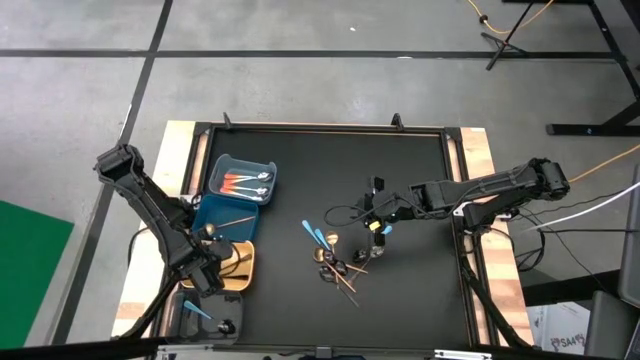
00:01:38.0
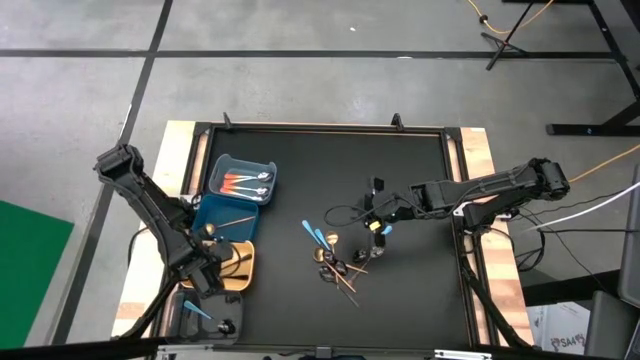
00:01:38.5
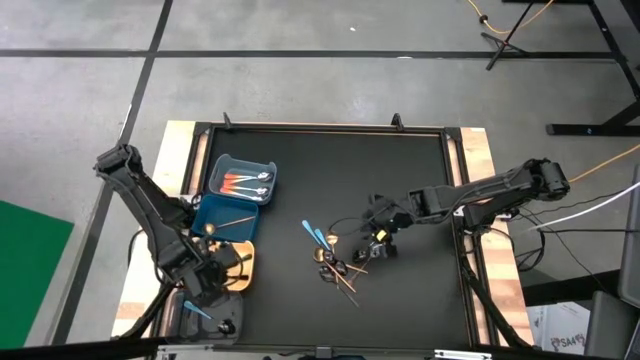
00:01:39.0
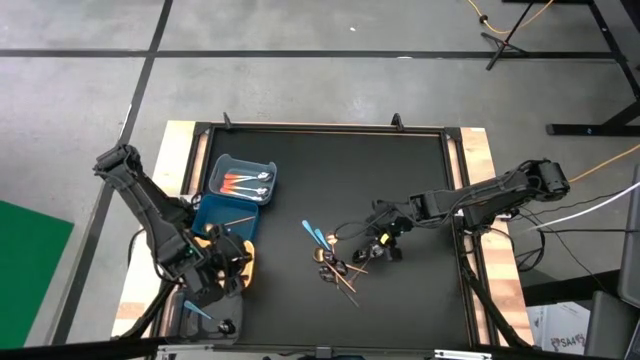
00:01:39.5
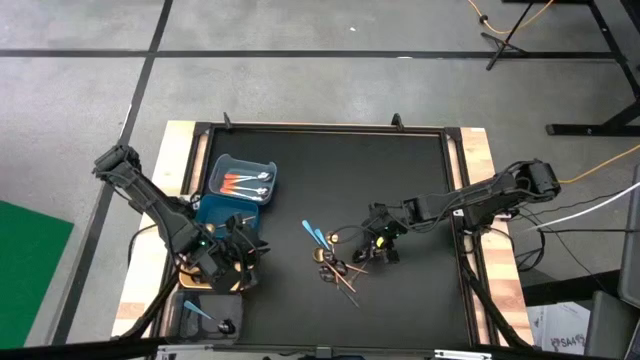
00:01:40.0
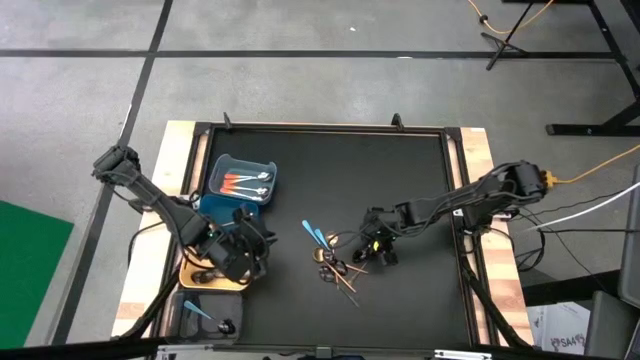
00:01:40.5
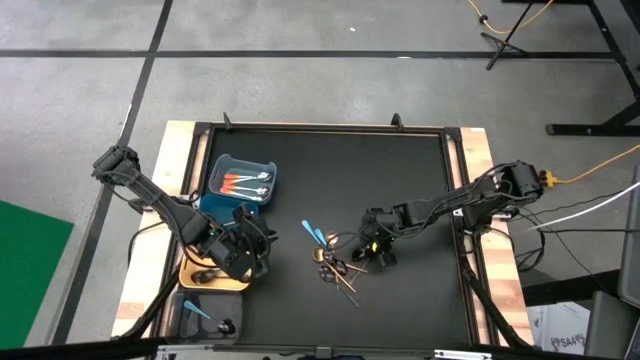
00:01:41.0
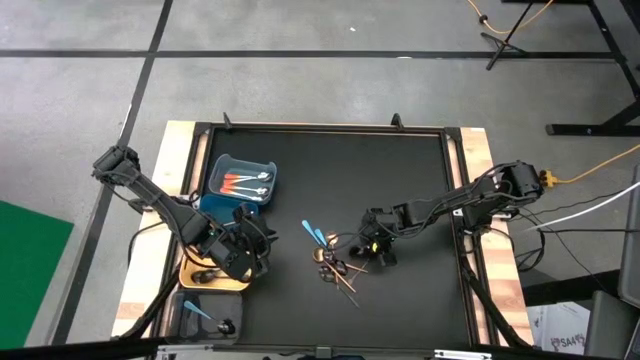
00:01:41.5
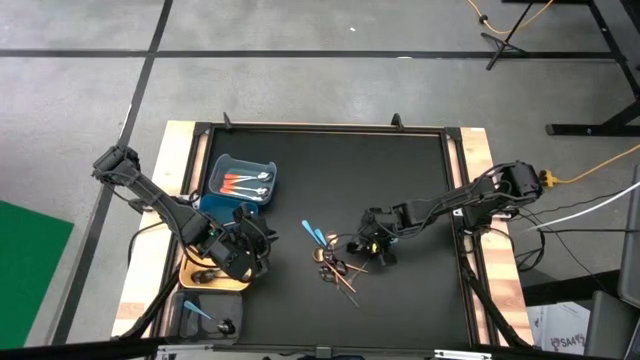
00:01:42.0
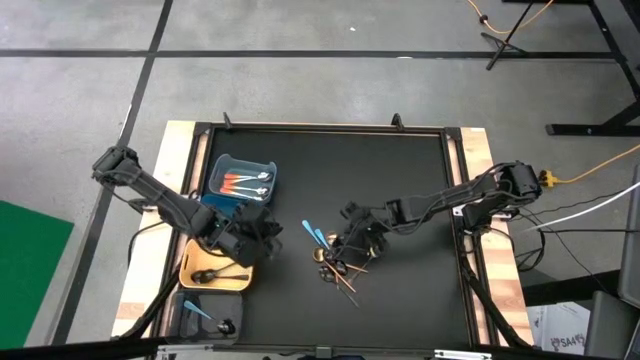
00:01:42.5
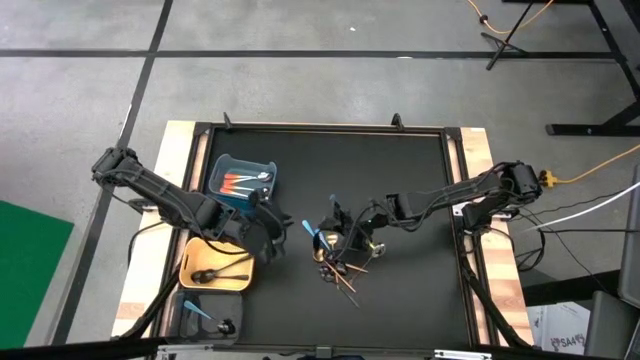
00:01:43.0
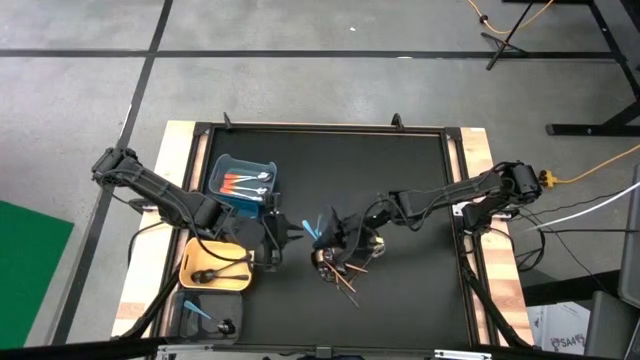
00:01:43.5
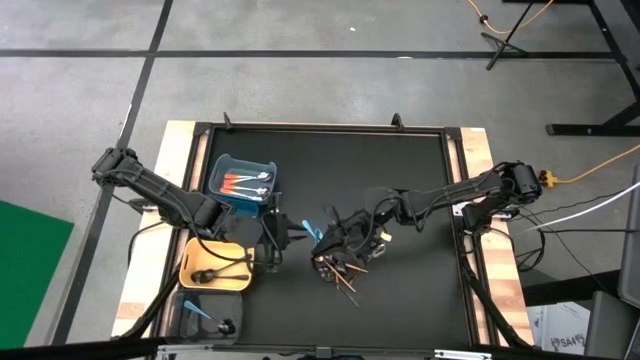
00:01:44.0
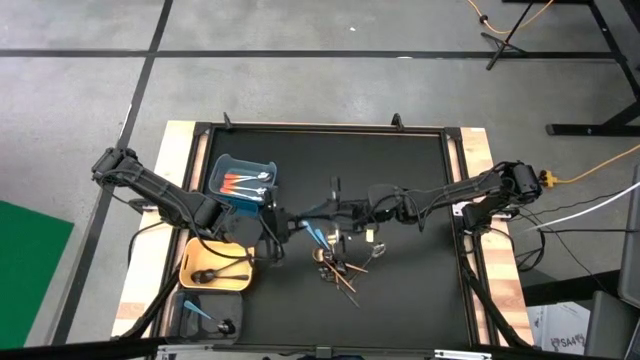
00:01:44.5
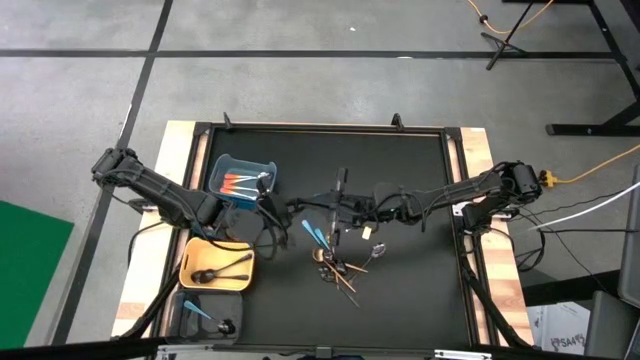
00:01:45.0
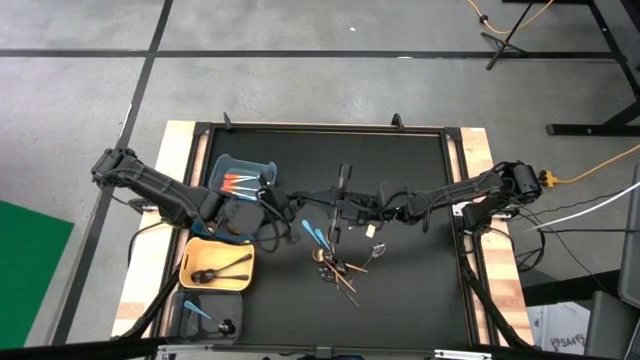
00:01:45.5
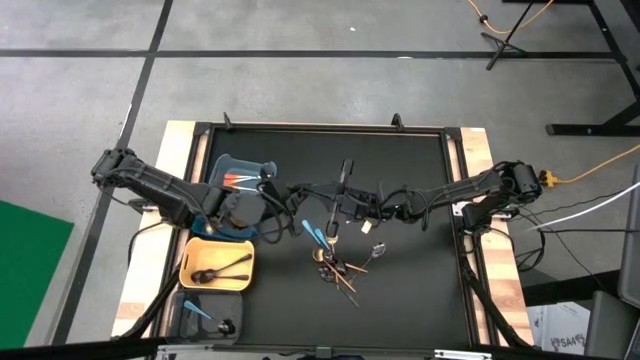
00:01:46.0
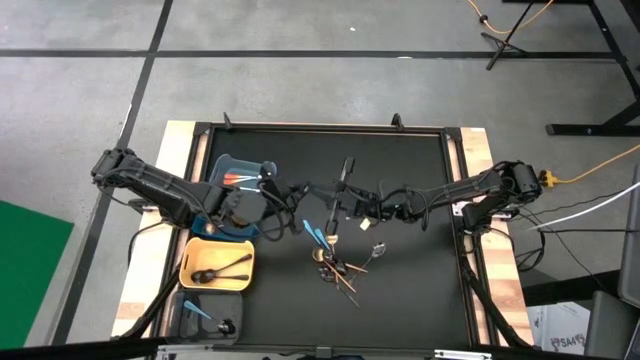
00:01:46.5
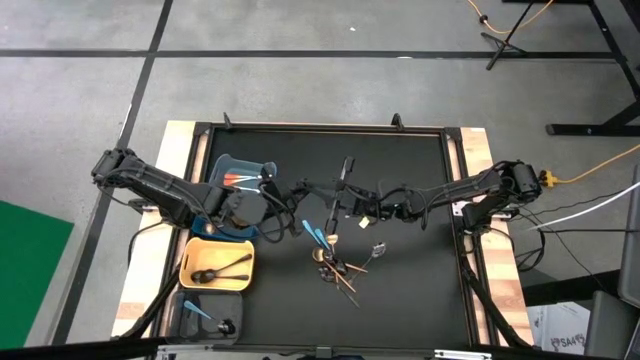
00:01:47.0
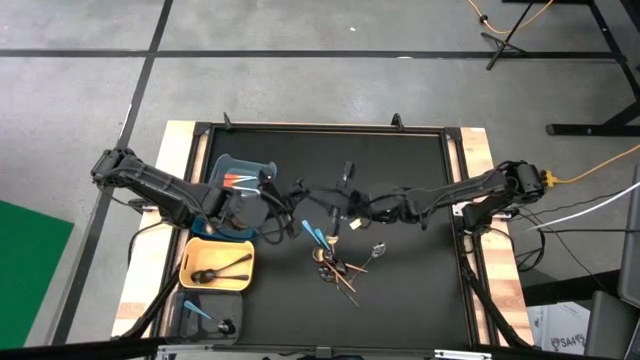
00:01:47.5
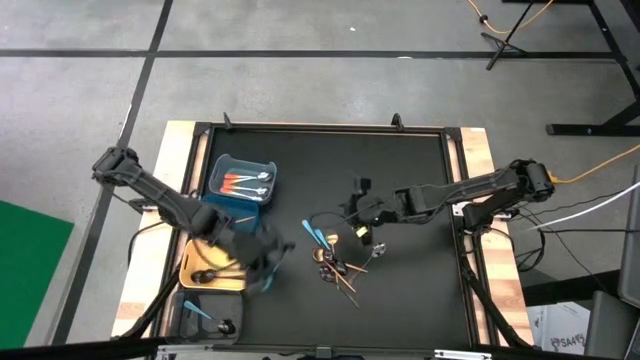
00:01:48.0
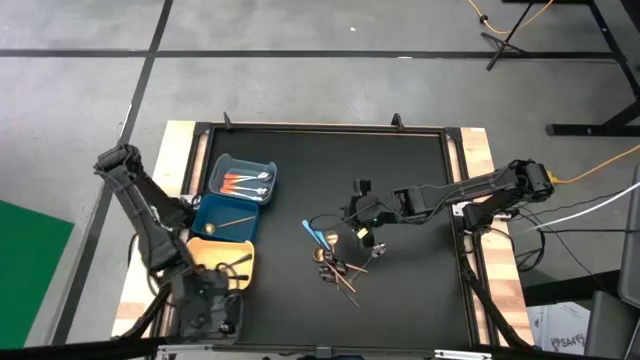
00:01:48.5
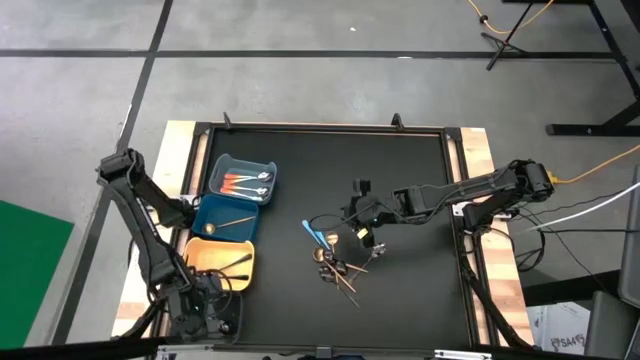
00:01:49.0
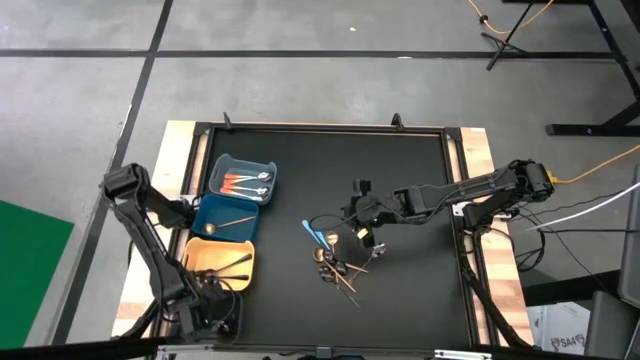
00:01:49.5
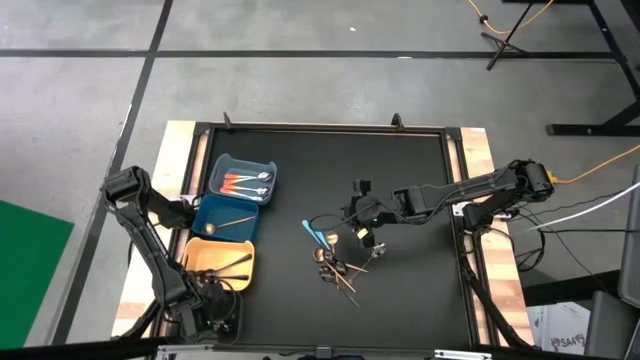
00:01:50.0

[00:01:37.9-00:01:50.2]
Task: Sort silverware by color (type)
Put the blue spoon into the black bin

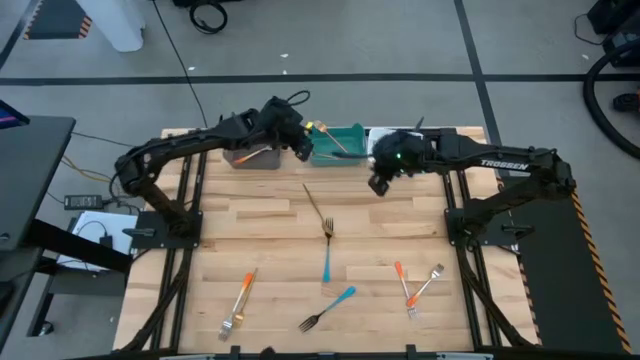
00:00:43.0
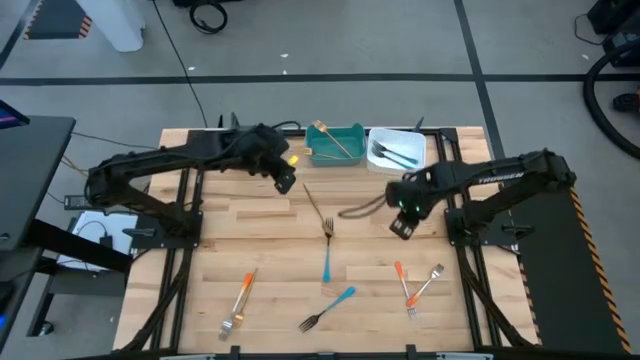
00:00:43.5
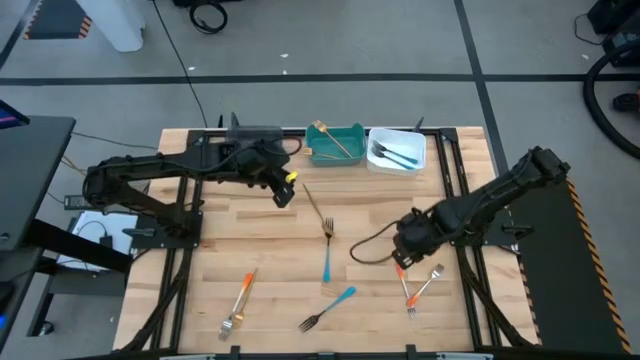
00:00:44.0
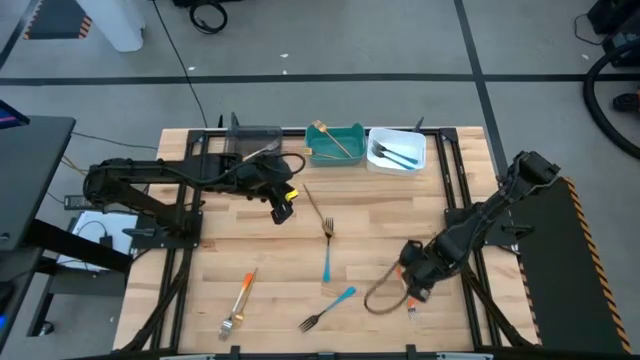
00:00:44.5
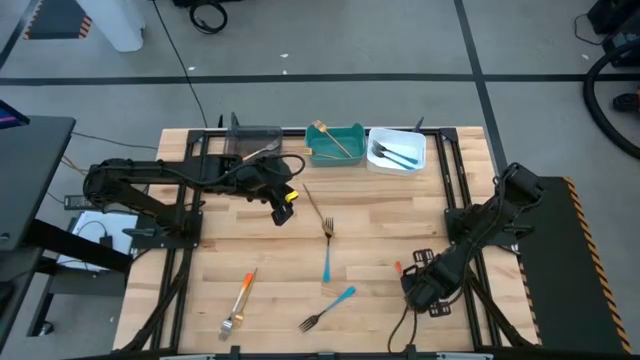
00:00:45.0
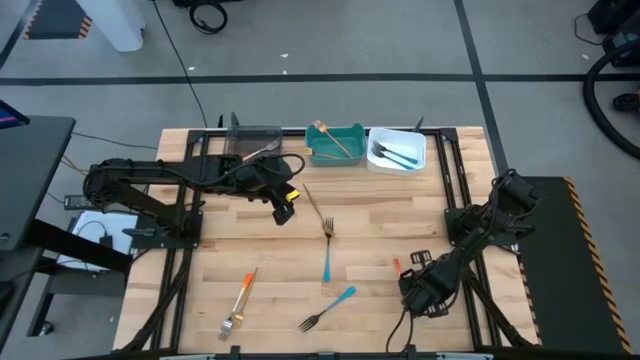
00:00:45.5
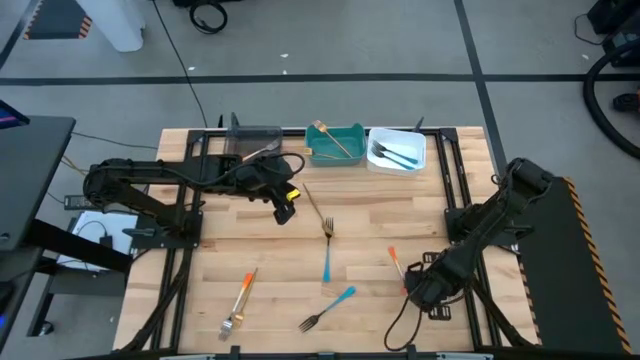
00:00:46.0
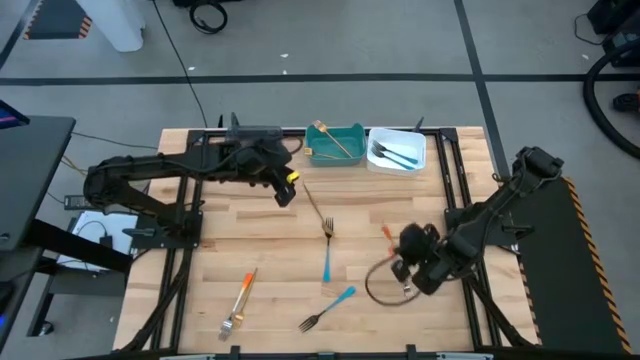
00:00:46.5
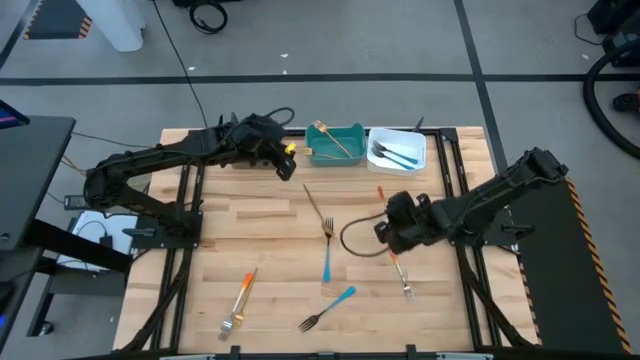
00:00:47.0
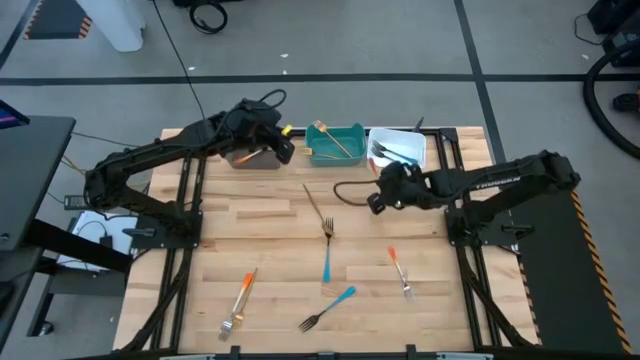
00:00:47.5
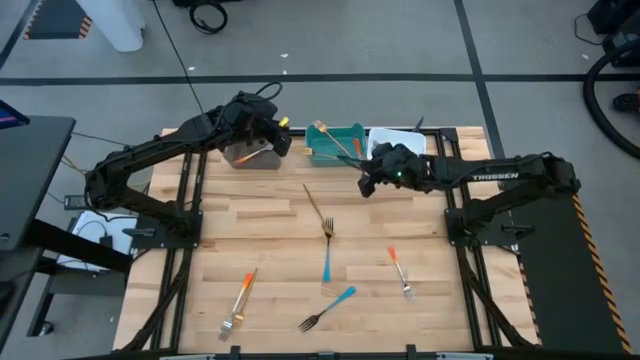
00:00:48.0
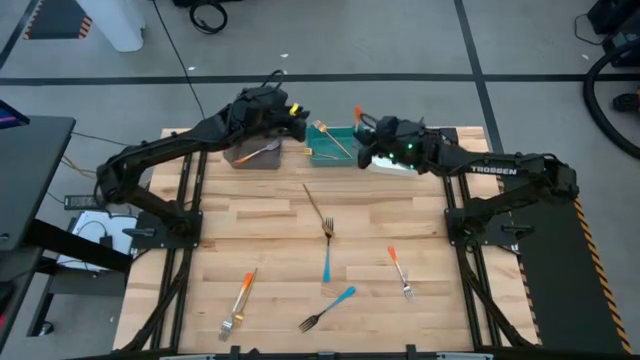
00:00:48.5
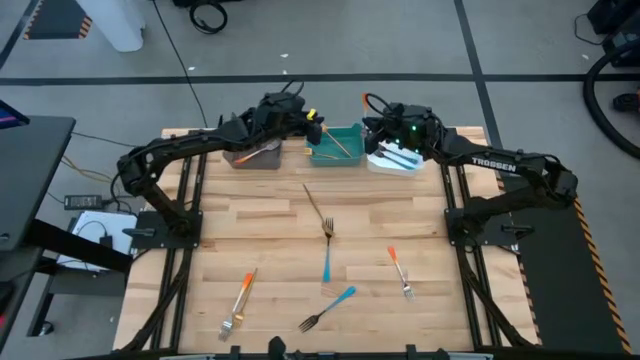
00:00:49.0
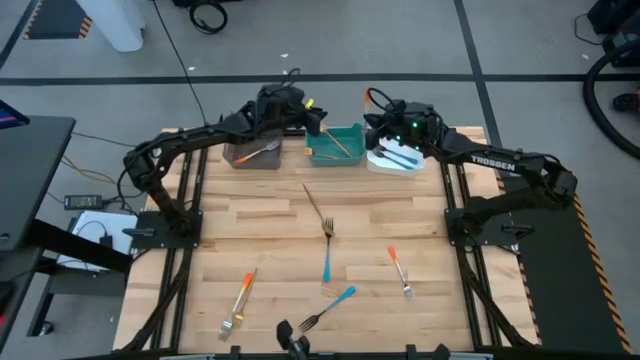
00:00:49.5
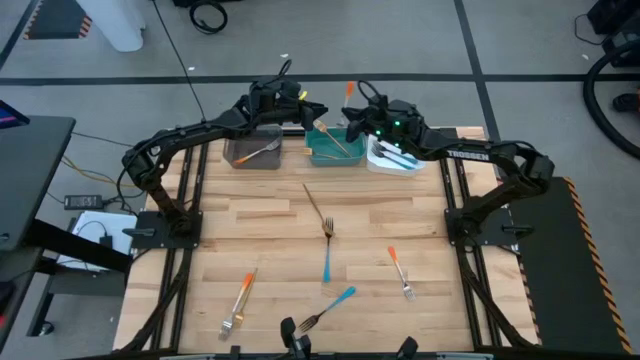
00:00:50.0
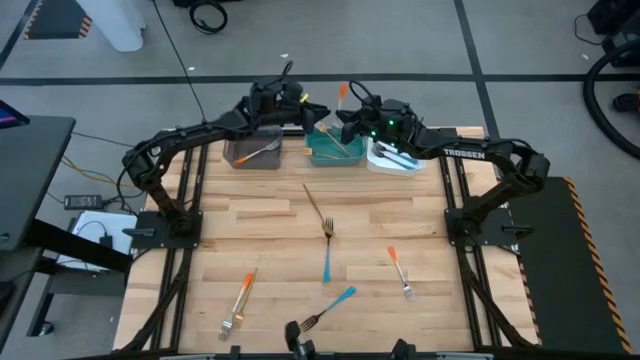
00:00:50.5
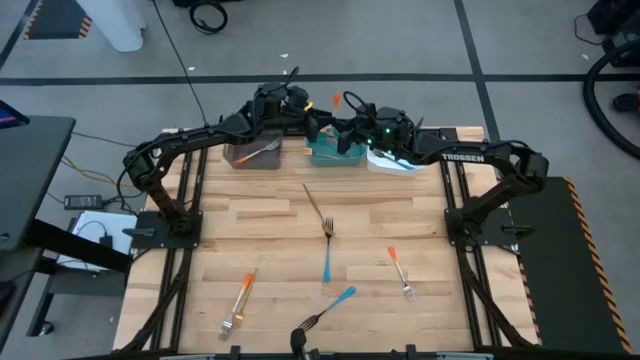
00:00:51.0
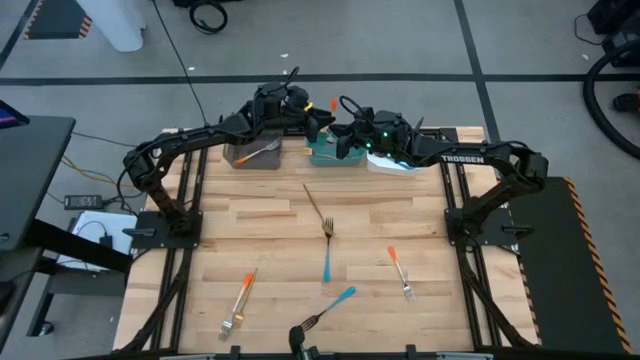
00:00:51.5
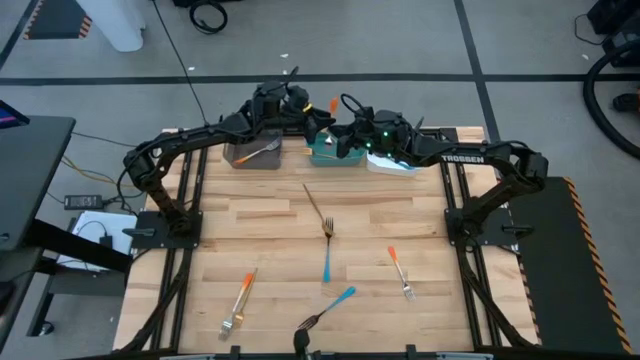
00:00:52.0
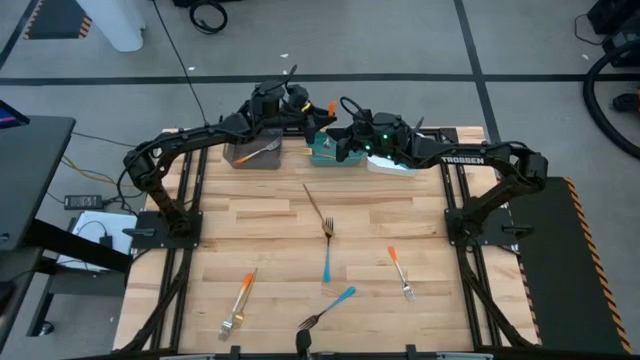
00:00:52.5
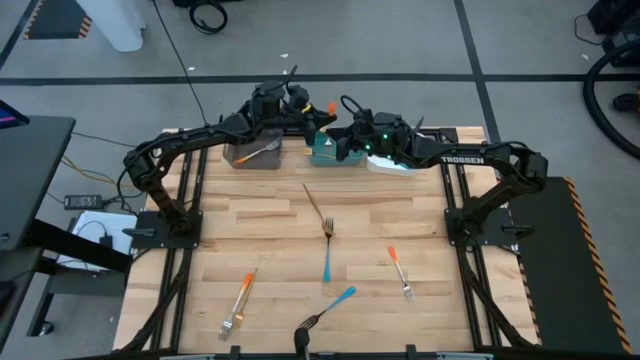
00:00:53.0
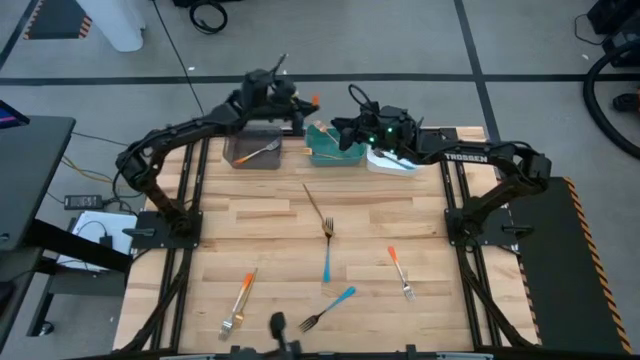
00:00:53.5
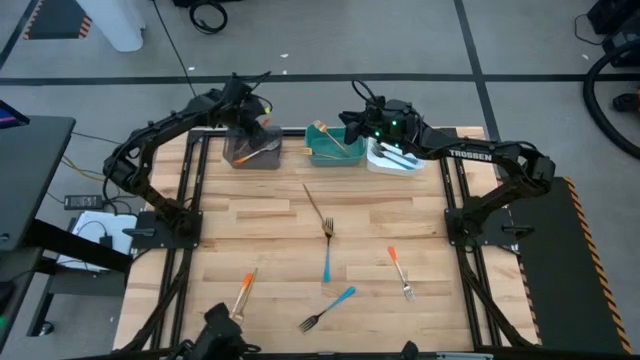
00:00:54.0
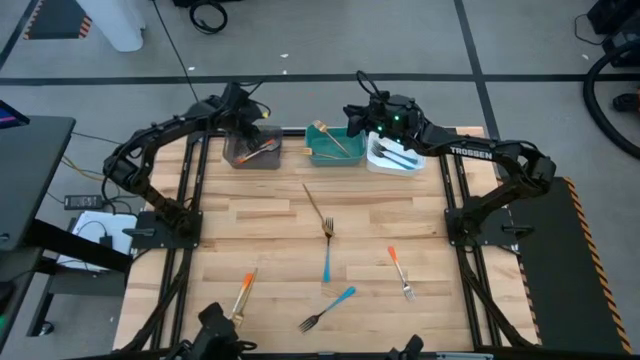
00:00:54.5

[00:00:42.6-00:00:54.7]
Task: Sort silverware by color (type)
Put the right orange fork into the black transparent bin
